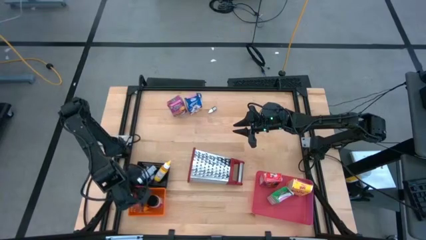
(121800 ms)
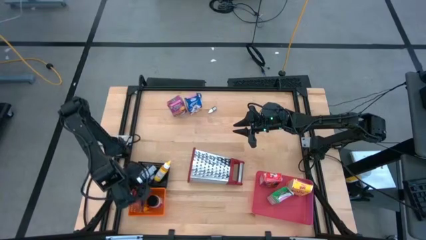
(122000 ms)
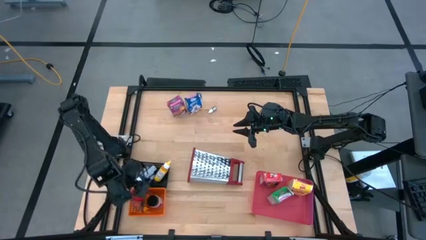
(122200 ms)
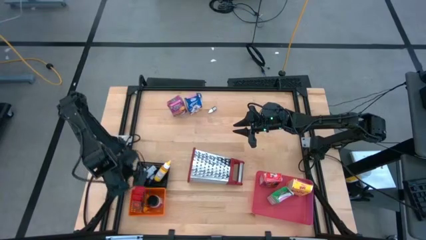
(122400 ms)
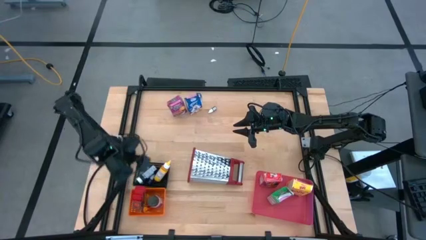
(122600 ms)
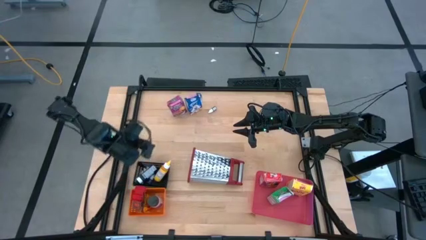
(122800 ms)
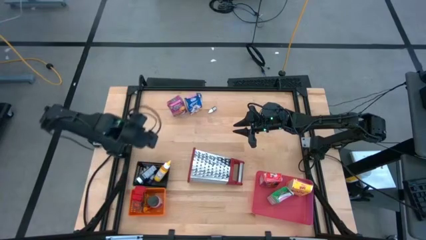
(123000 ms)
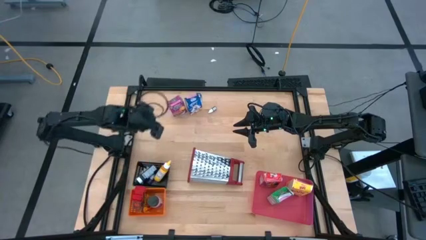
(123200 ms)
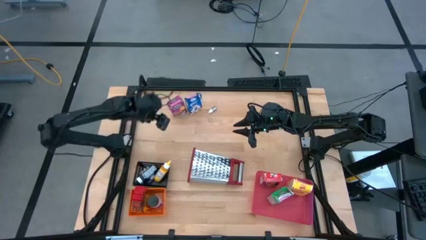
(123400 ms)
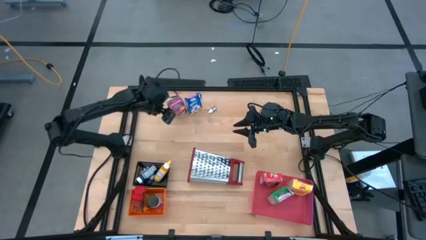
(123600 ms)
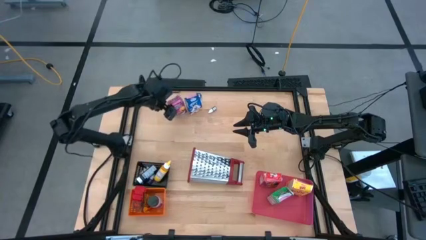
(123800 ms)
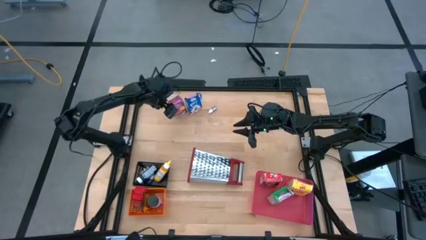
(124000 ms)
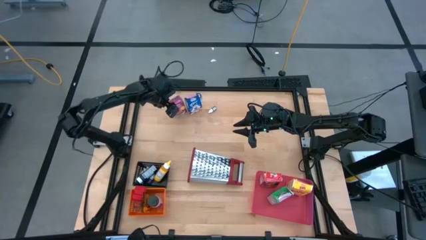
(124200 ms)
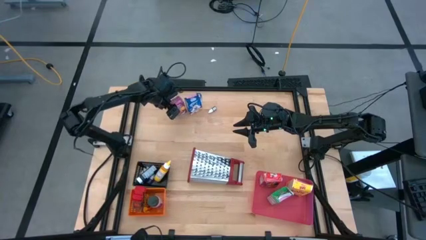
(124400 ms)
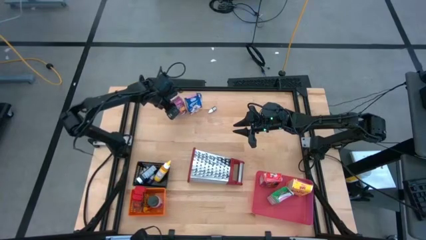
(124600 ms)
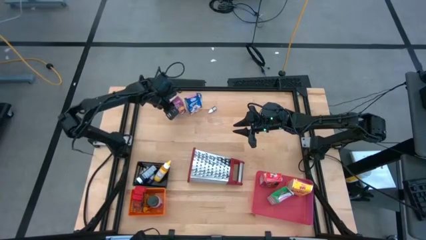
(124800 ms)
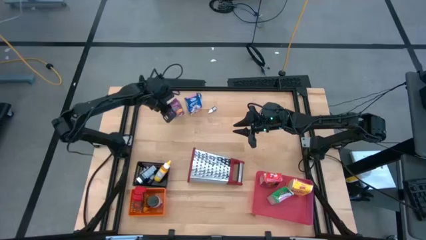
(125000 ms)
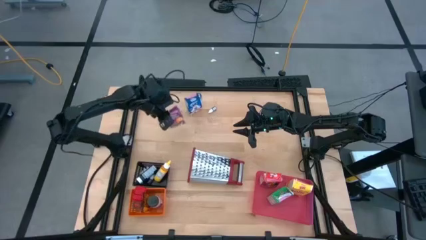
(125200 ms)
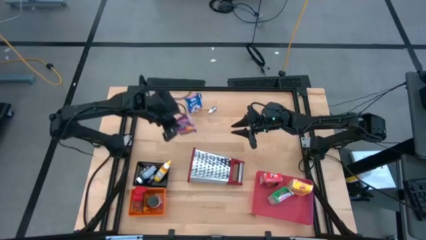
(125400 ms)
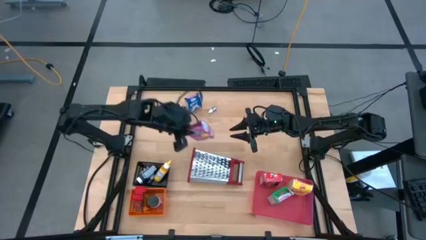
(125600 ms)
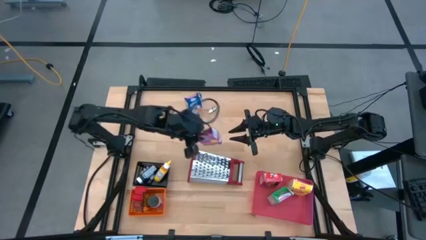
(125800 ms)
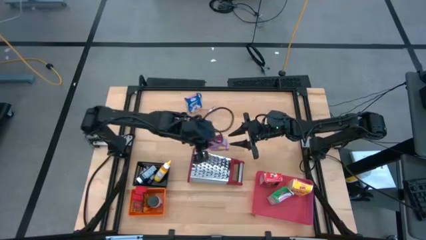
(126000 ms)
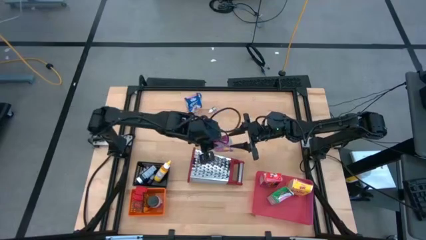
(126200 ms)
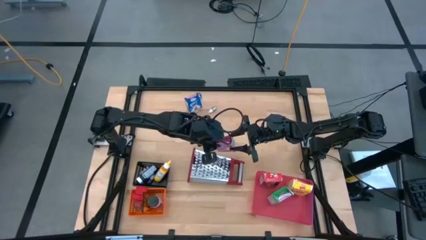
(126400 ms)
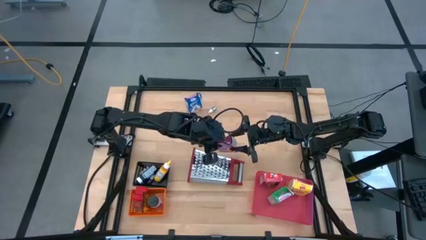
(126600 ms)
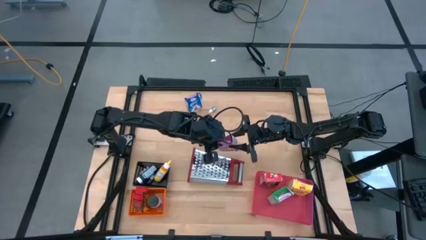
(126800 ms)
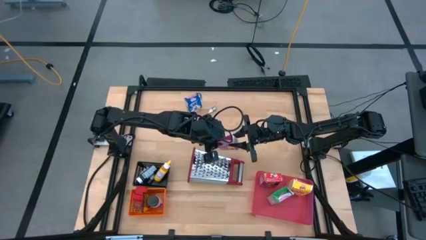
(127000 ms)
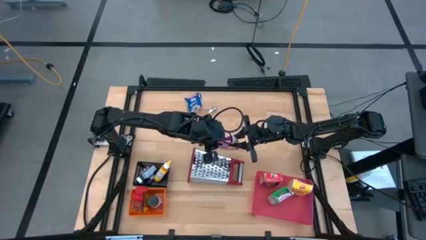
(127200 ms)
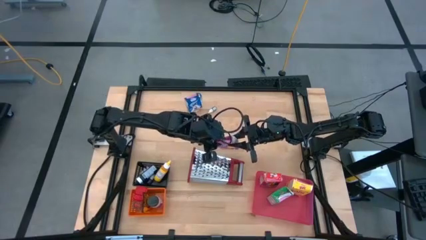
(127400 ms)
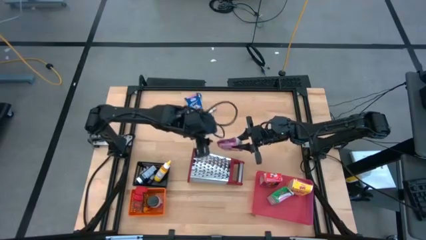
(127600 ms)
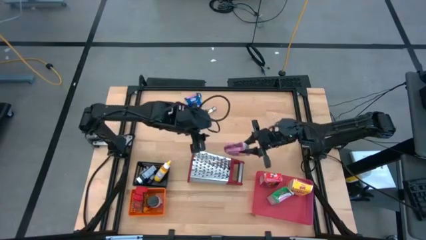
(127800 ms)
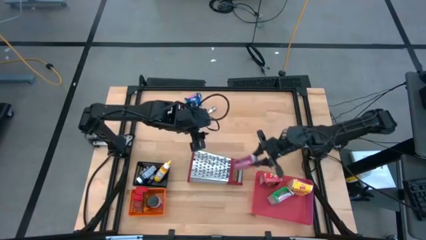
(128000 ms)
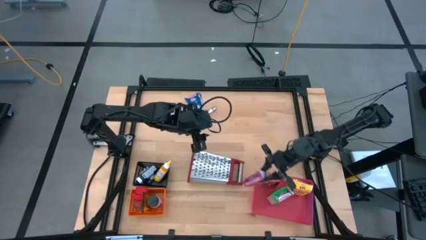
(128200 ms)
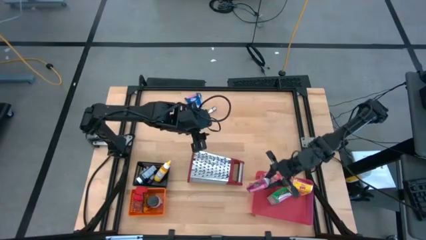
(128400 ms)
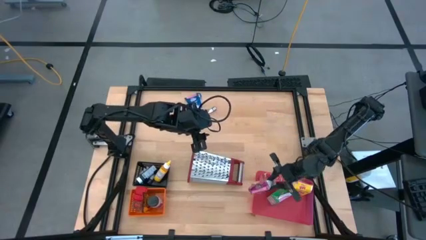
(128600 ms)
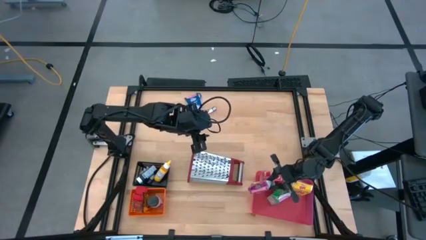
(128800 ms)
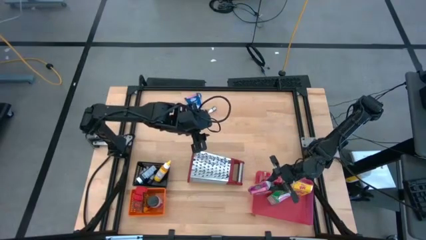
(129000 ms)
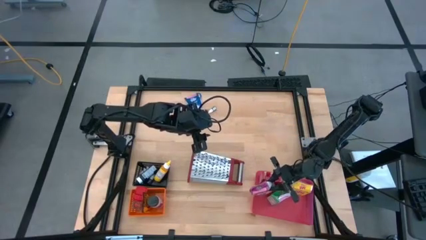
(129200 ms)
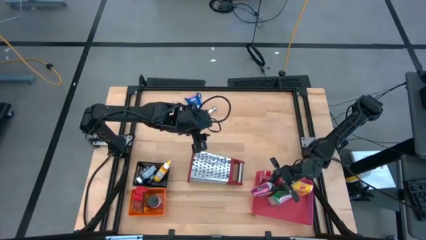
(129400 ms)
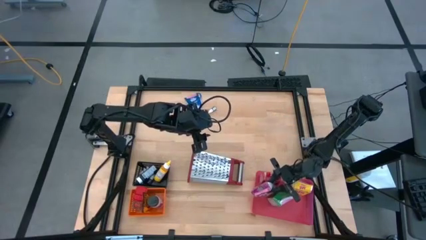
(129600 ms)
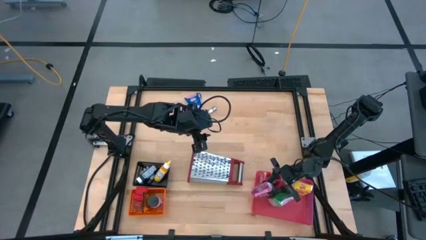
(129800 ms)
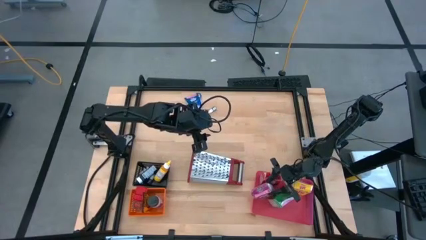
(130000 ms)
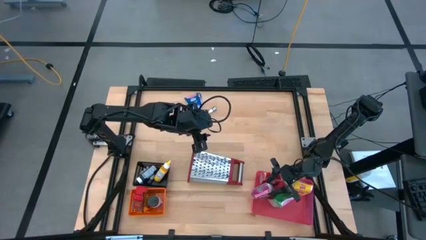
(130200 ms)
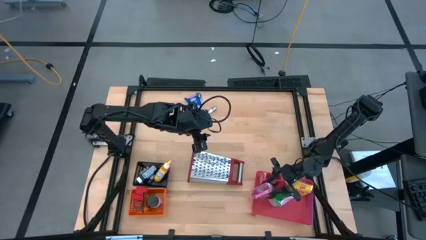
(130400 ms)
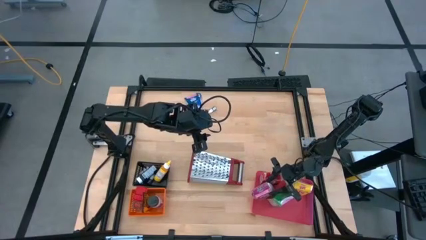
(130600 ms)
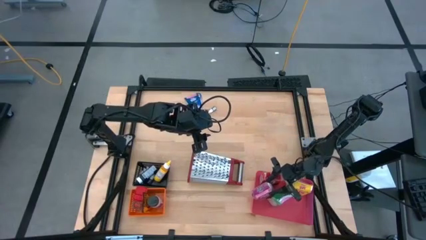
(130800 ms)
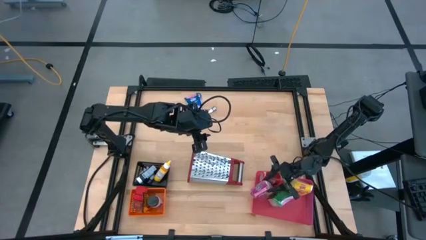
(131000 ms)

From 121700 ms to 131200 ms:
Task: Pick & Place Kitchen Items
Put the violet cereal box into the pink bin

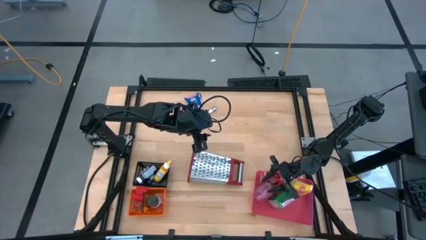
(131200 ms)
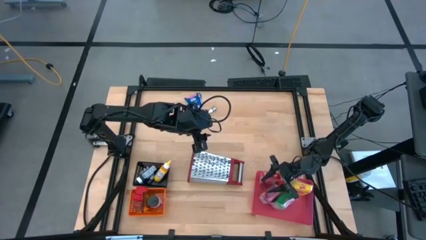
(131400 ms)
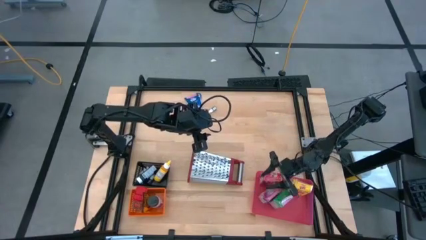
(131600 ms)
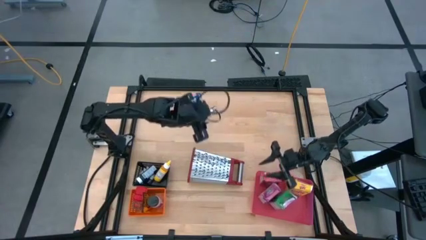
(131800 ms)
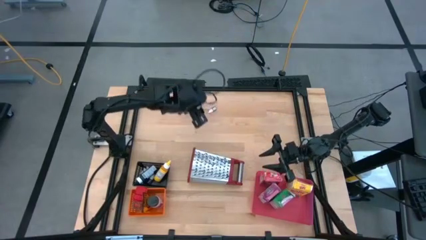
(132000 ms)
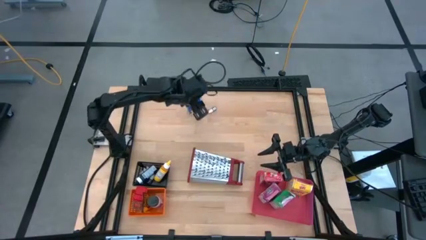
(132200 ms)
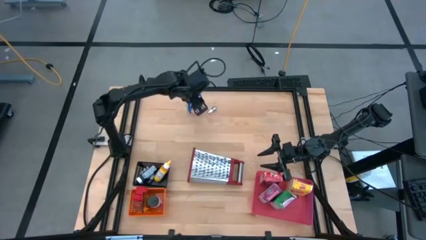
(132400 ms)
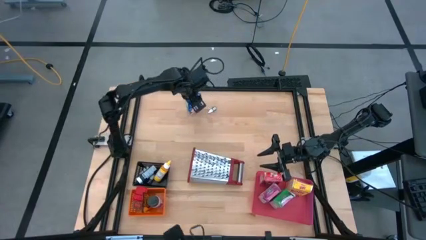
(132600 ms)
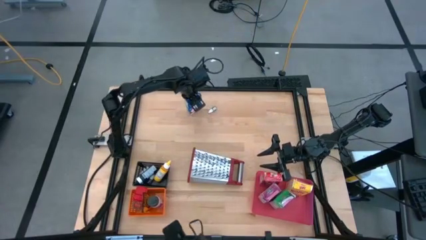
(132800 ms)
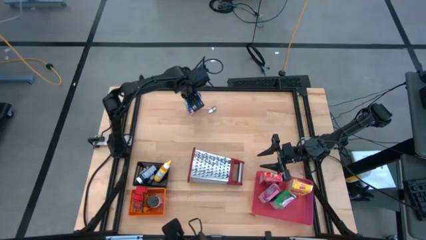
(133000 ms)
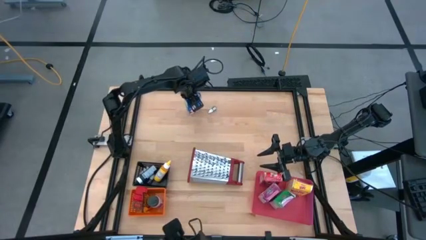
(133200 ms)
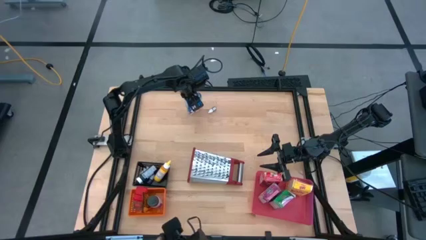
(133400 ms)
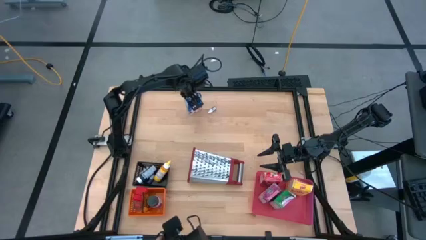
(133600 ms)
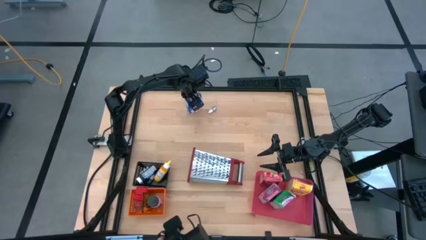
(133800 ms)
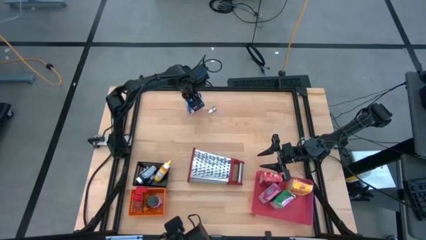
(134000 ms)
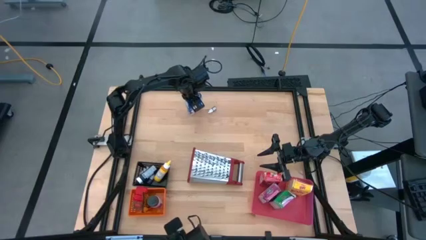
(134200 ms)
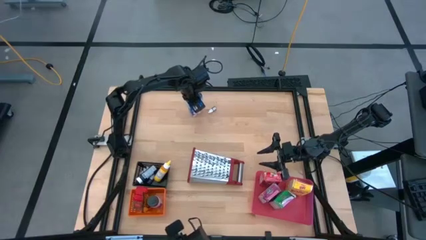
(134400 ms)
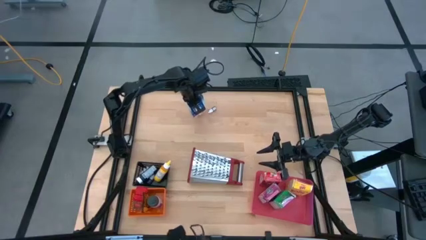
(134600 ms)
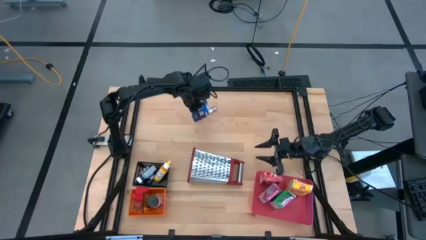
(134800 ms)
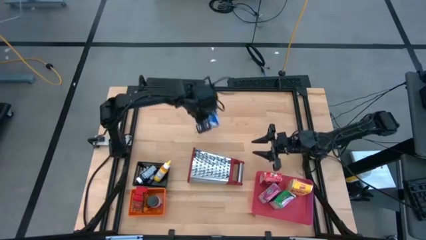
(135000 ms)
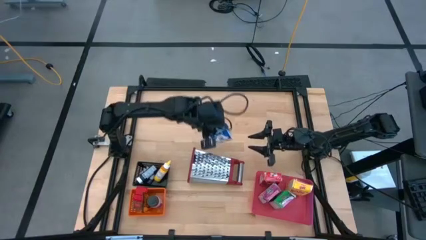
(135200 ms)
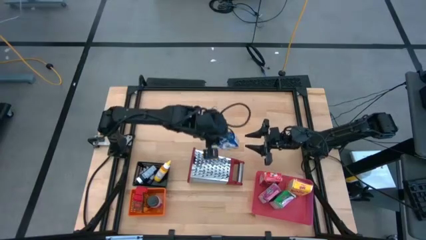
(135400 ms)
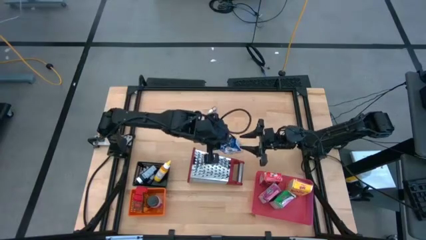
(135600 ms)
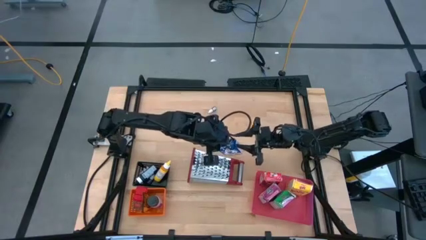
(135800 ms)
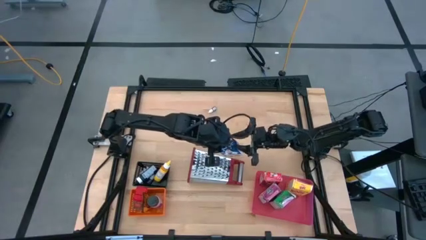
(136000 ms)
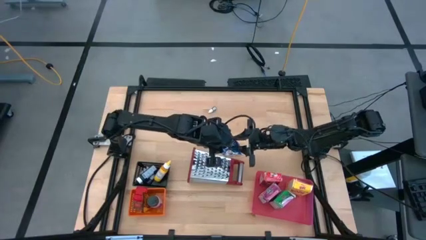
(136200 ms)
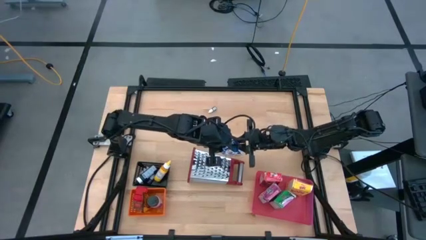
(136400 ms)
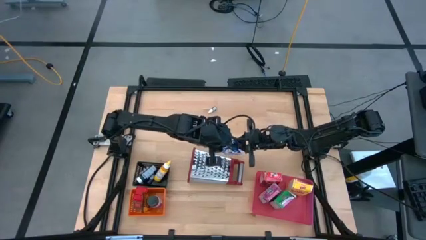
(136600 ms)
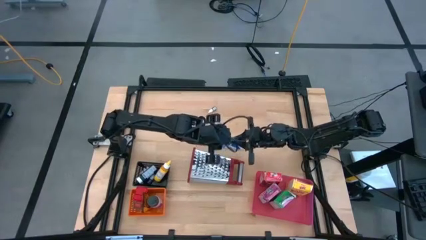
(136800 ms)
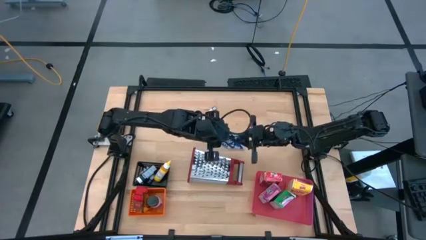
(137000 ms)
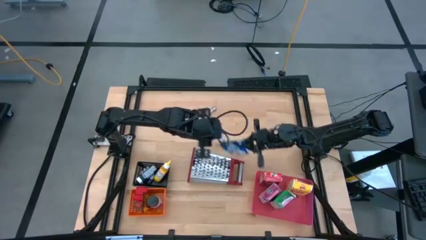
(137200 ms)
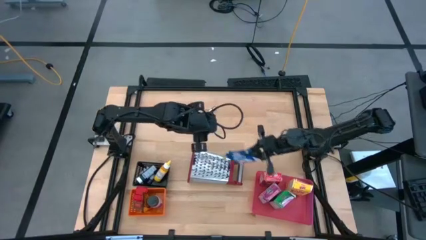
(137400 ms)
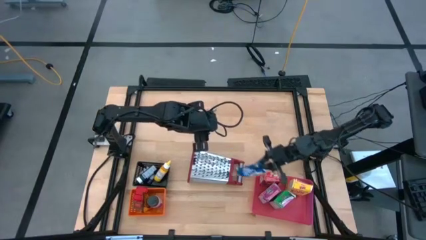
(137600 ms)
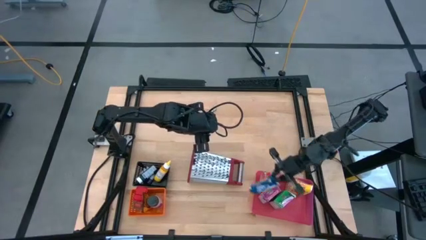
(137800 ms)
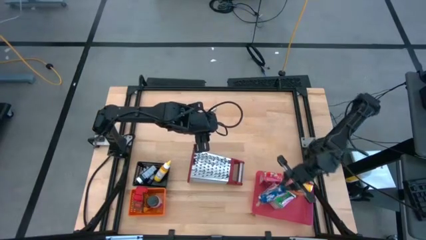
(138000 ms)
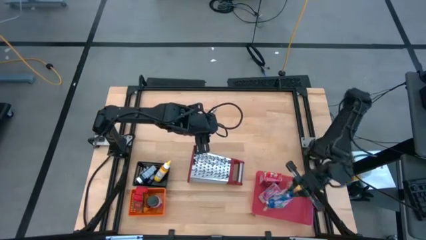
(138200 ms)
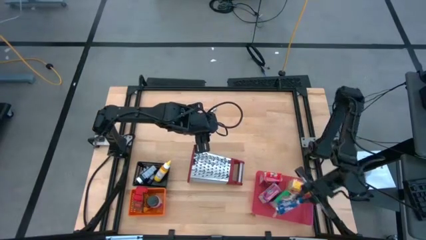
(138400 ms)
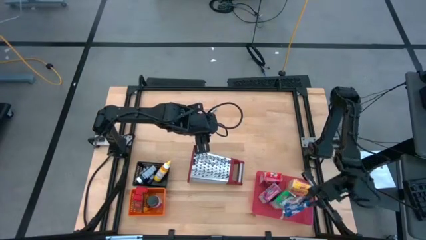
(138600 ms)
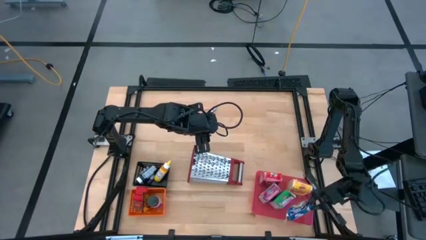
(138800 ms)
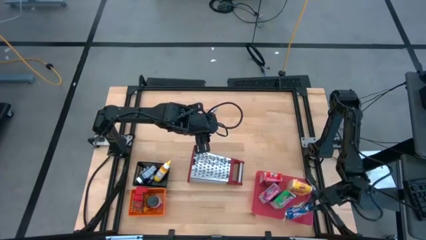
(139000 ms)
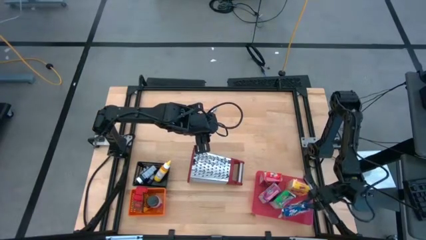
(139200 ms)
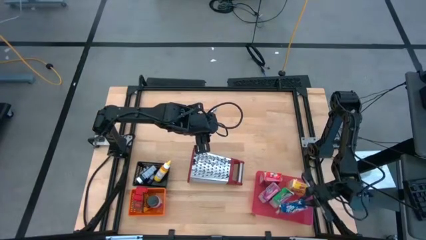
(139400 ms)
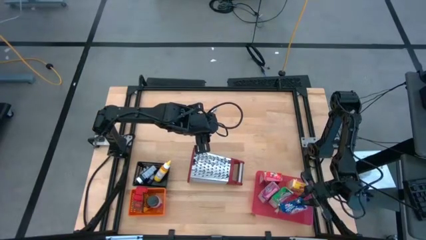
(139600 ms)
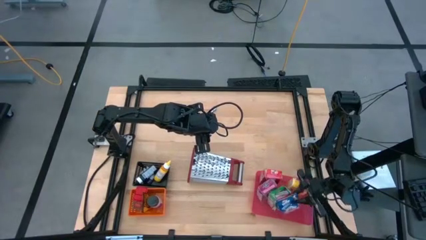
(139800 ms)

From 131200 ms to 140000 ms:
Put the blue cereal box into the pink bin
